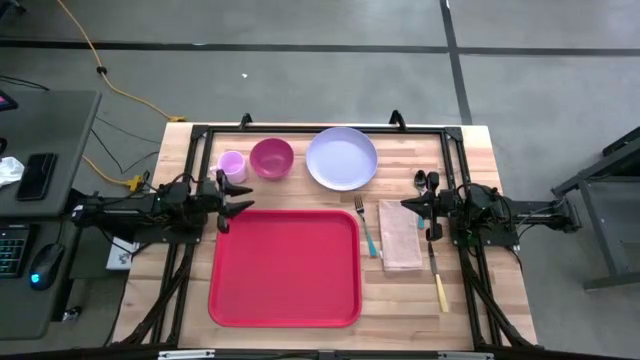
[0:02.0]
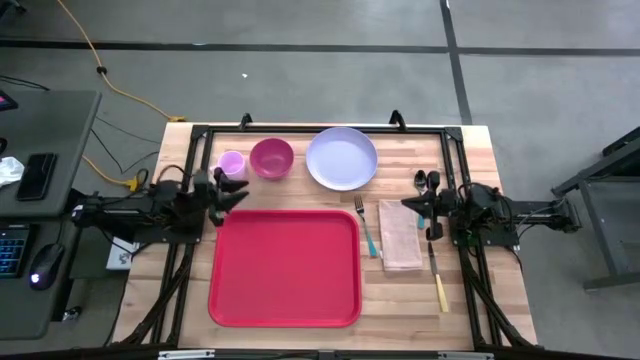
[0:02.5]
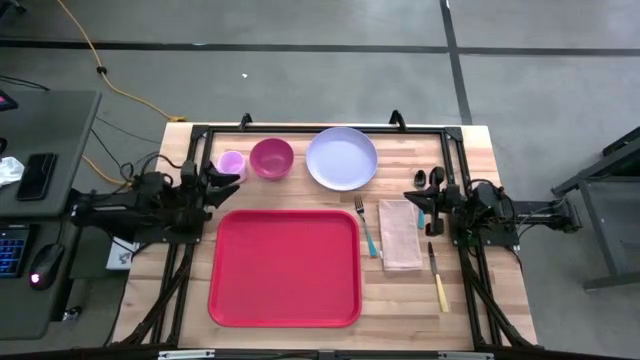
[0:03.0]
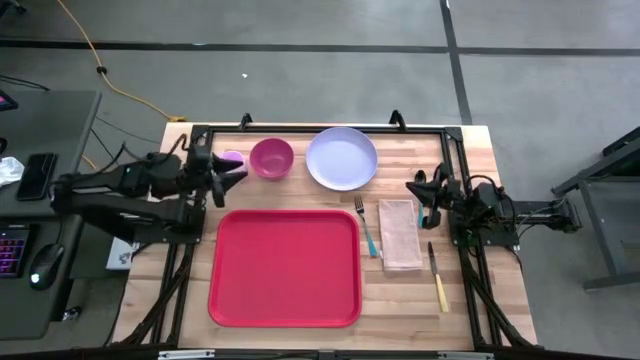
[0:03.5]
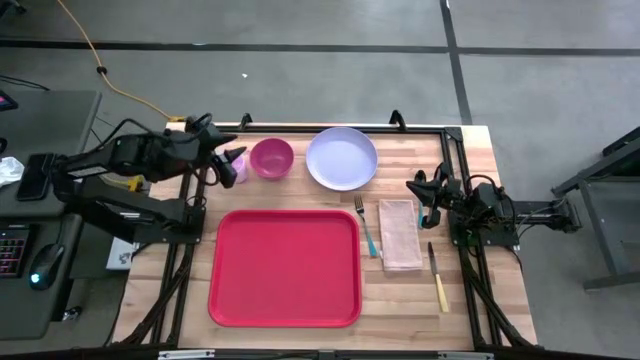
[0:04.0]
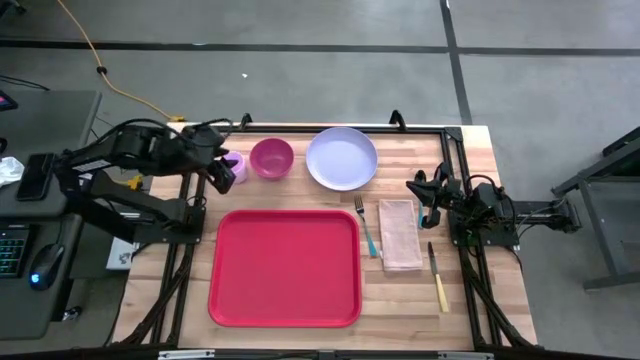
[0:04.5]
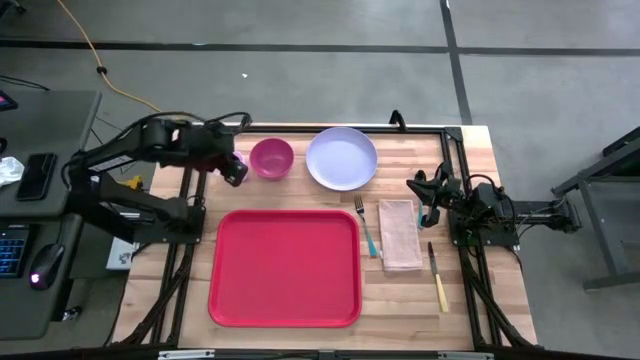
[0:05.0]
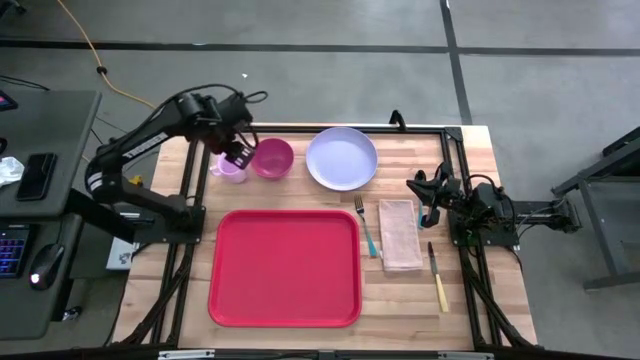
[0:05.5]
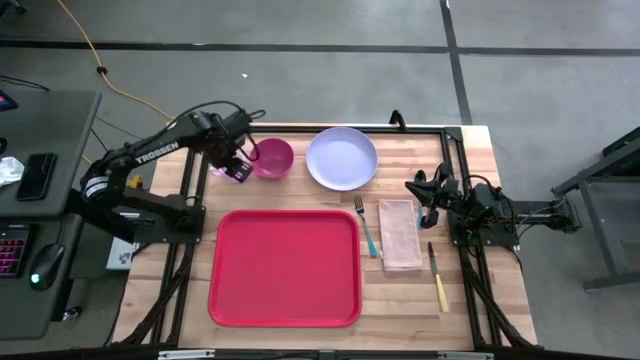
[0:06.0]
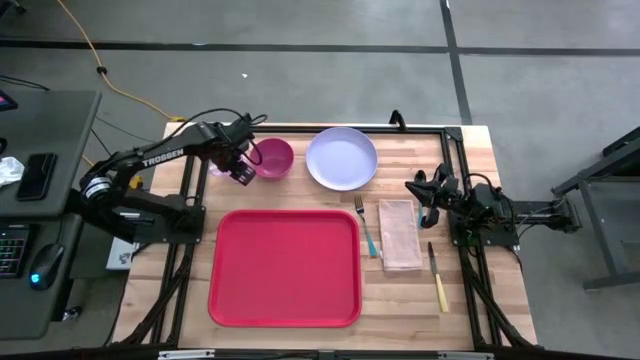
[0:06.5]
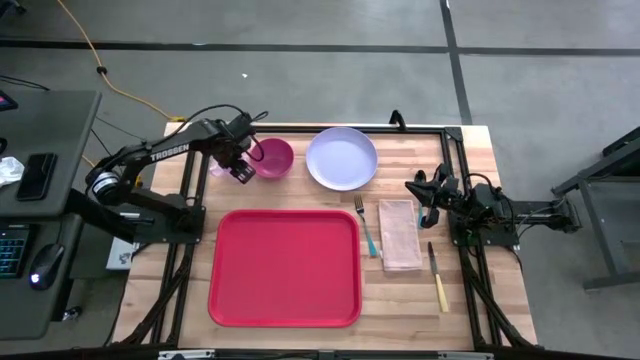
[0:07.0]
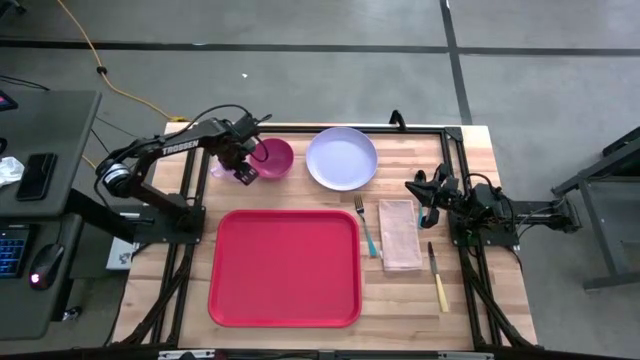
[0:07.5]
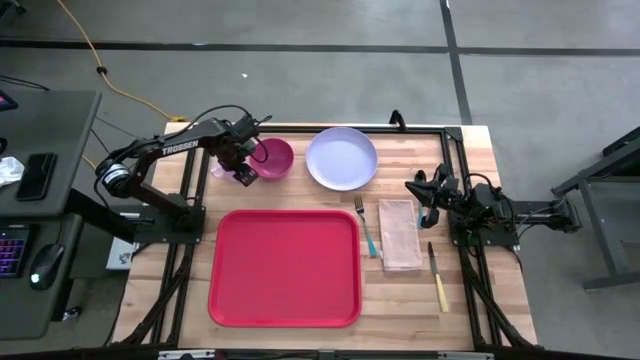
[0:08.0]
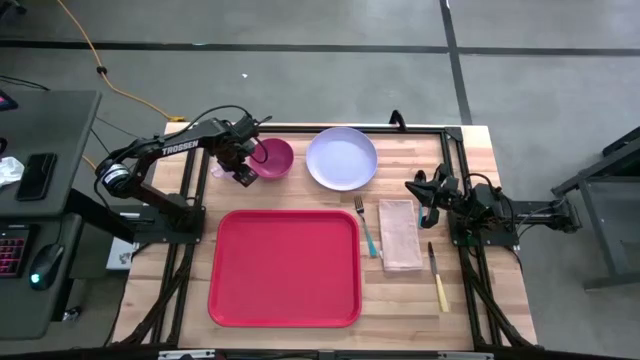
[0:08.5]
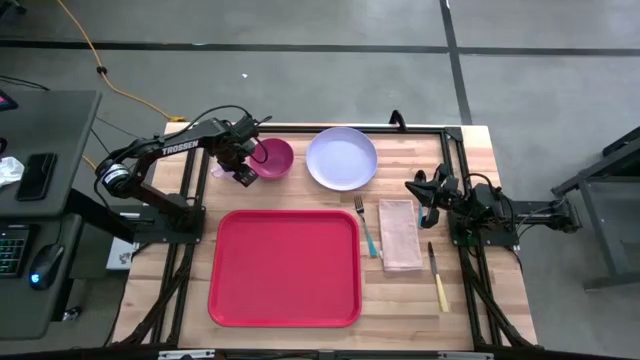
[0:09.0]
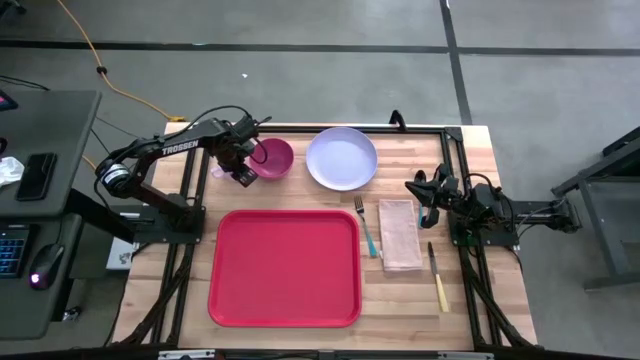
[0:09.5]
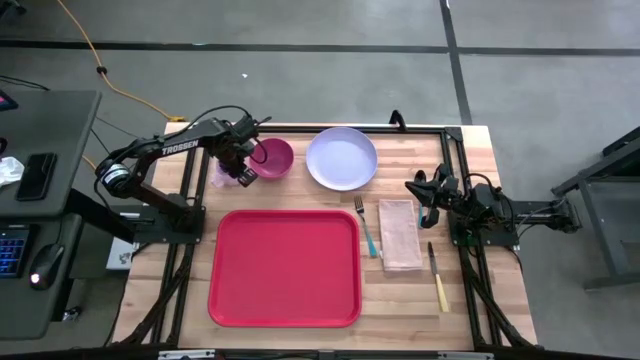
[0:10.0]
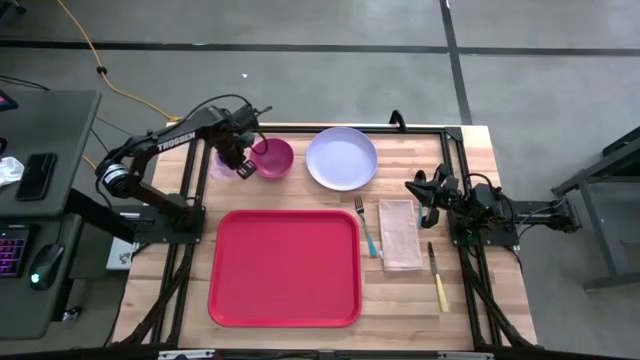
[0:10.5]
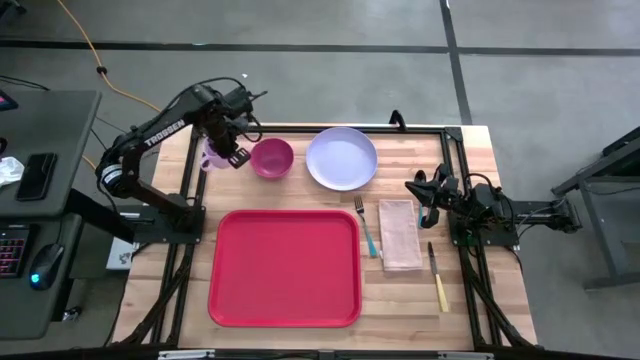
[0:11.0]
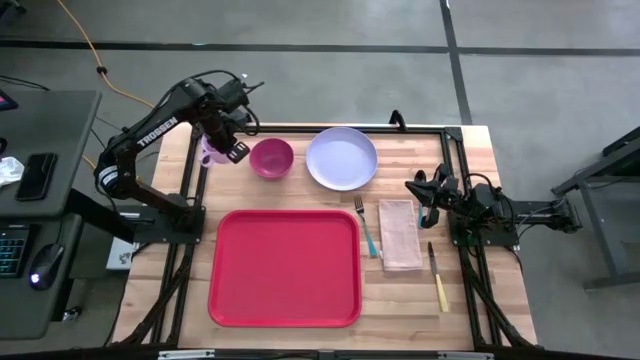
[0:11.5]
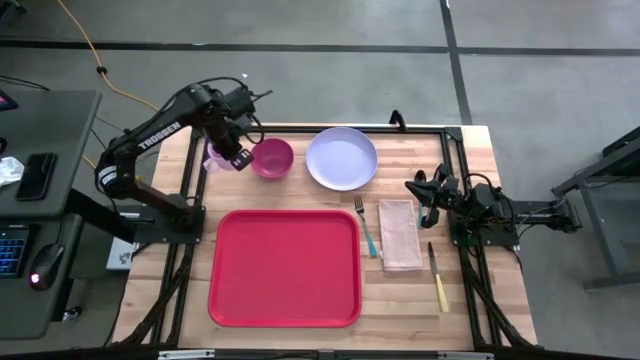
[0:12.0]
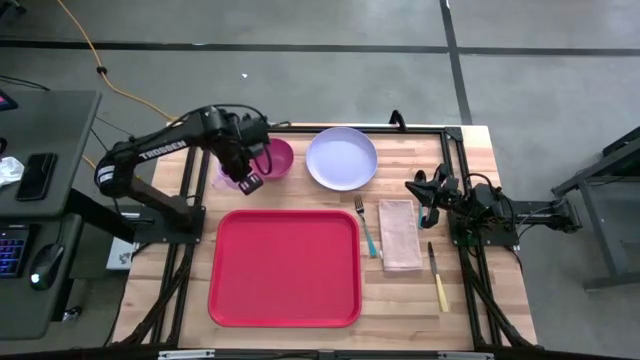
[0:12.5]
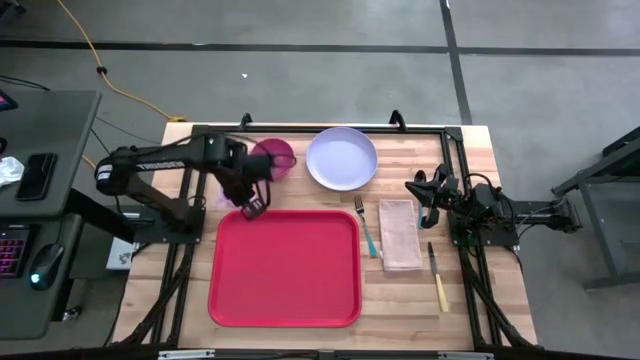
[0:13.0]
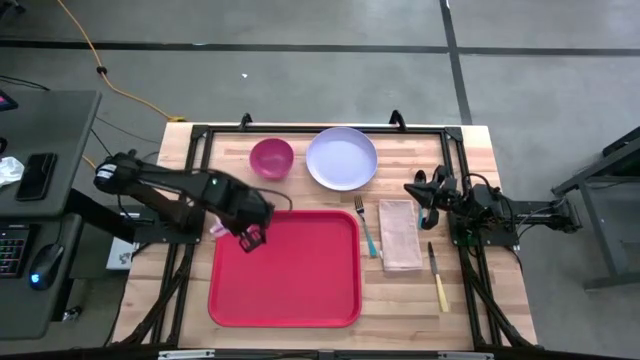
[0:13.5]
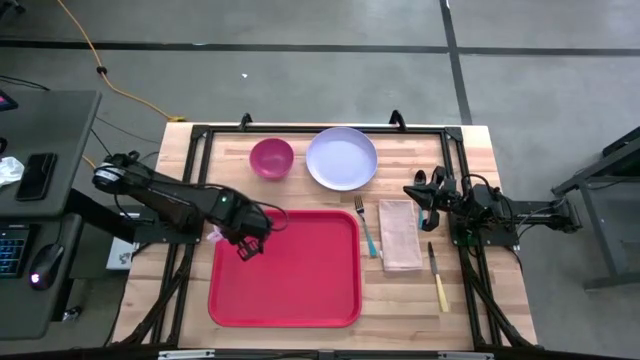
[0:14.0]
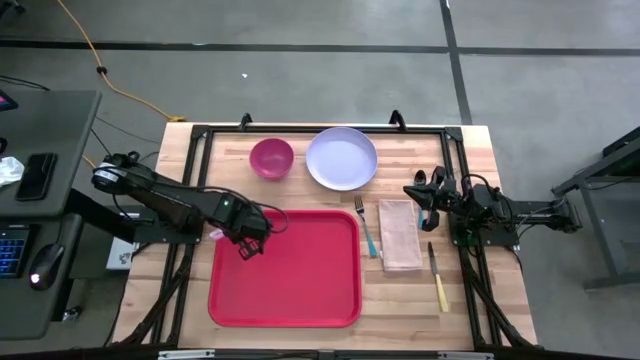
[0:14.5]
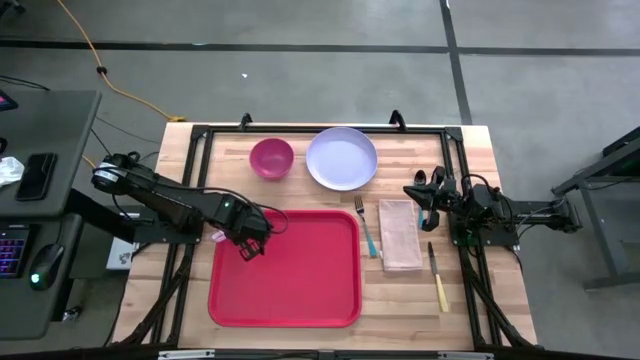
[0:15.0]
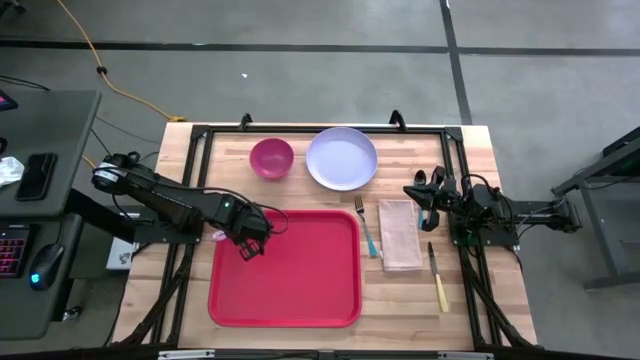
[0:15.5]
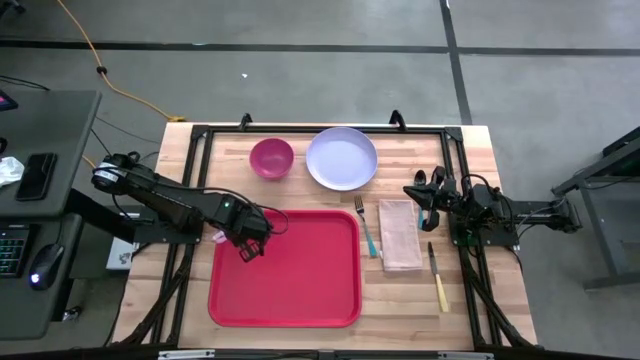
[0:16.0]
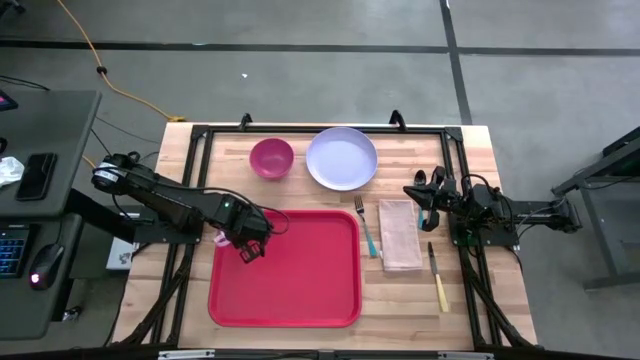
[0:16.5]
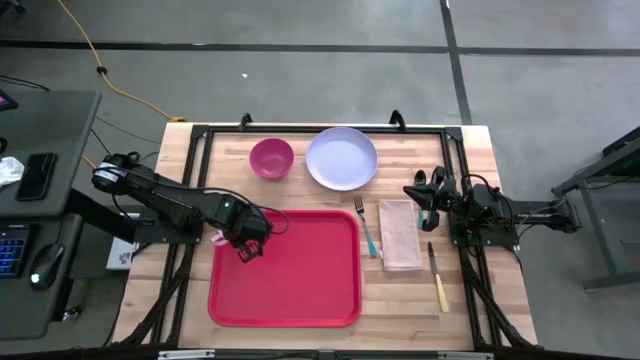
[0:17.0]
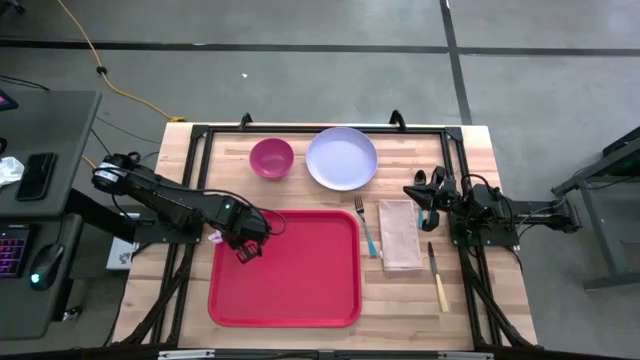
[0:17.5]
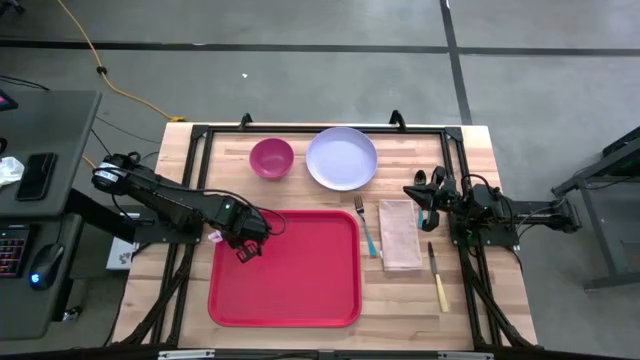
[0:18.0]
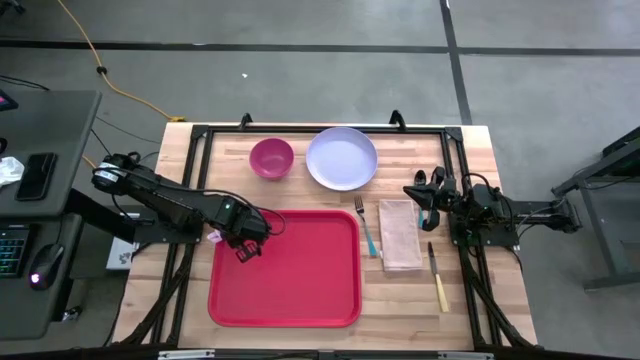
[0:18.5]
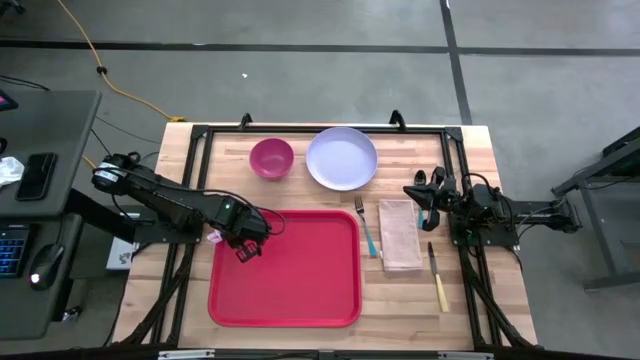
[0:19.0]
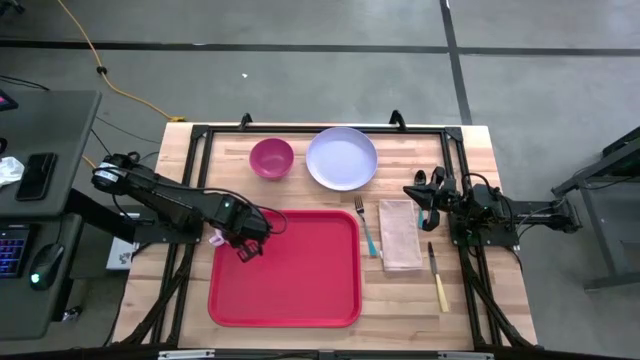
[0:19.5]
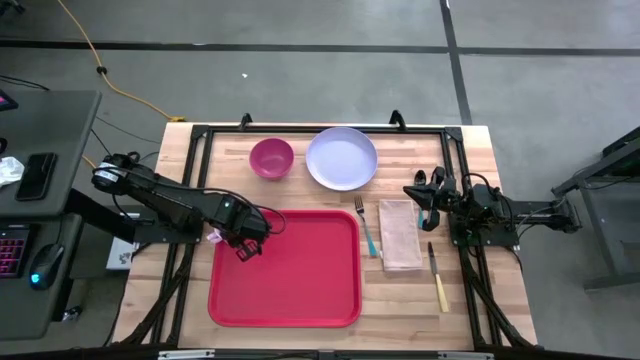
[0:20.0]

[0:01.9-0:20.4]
Task: Set up tray
Put the purple mug to the top left of the red tray

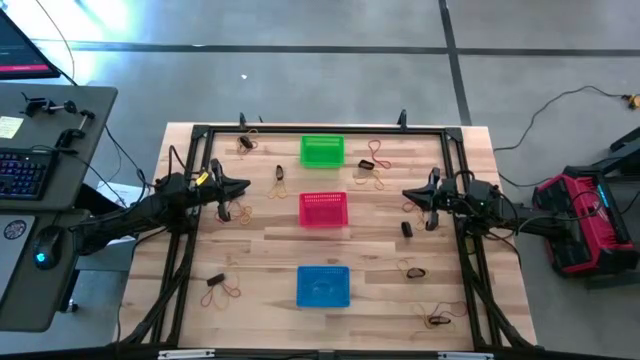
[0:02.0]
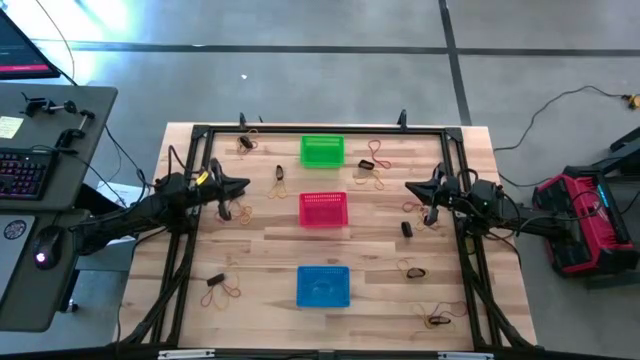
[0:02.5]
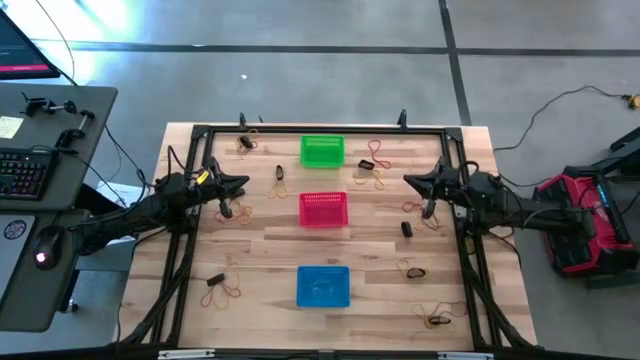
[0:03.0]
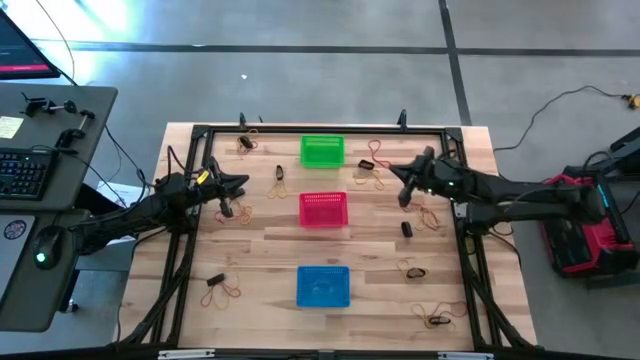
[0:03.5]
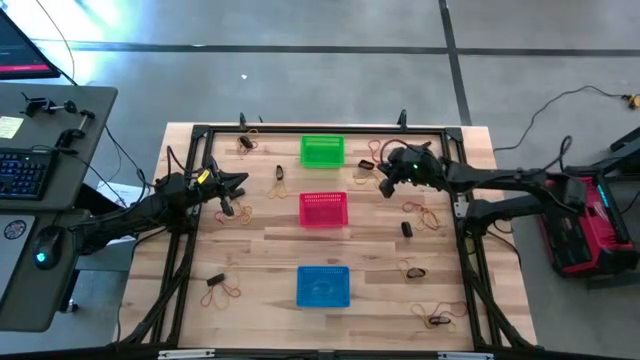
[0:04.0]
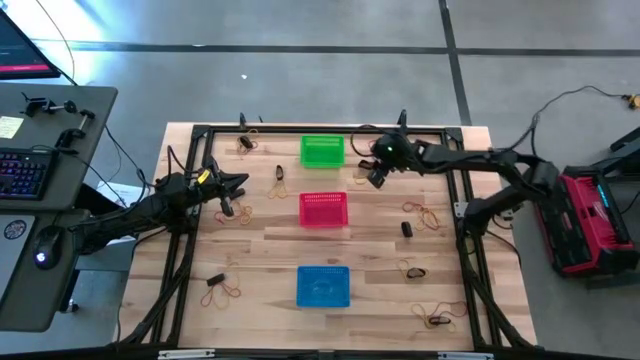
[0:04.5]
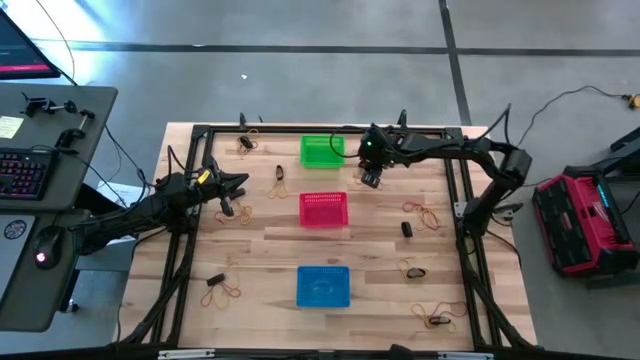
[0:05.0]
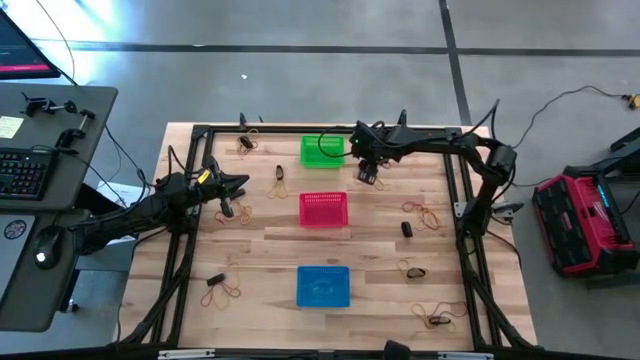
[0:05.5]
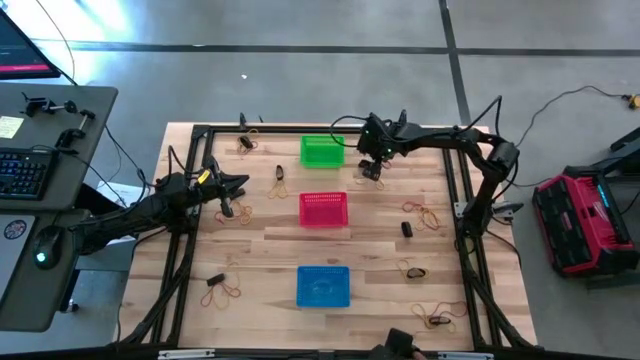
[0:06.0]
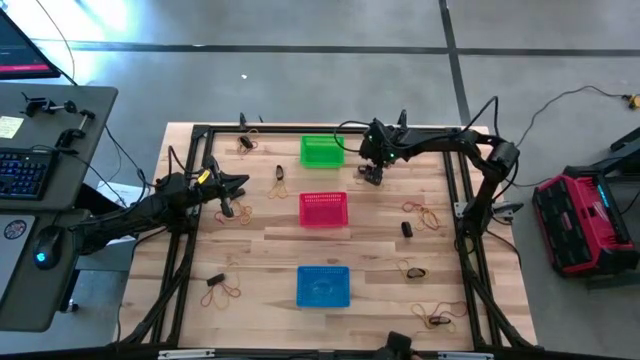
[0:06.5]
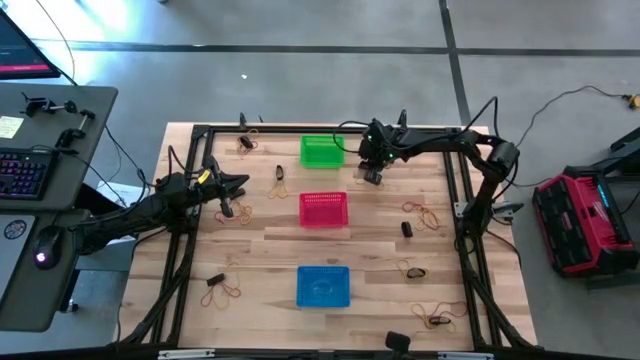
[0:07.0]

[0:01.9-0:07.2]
Task: Sort rubber bands into baskets
Put the black rubber band into the red bin
